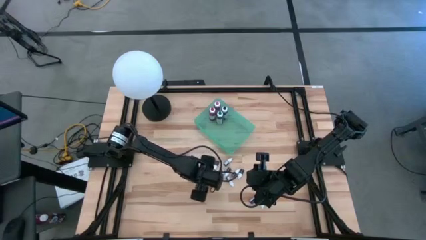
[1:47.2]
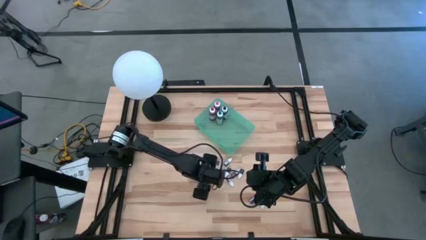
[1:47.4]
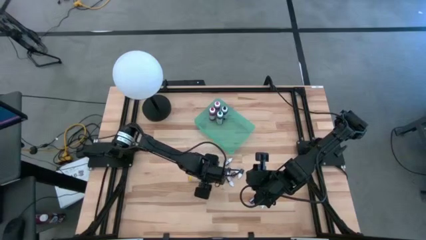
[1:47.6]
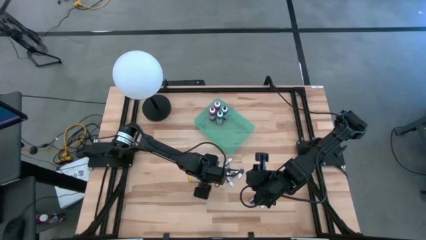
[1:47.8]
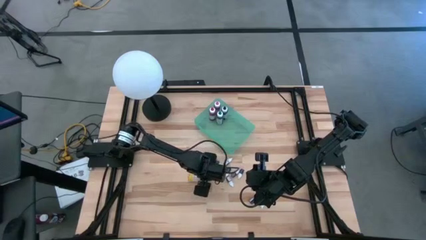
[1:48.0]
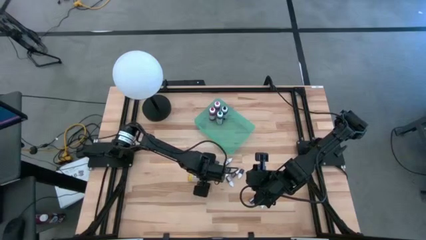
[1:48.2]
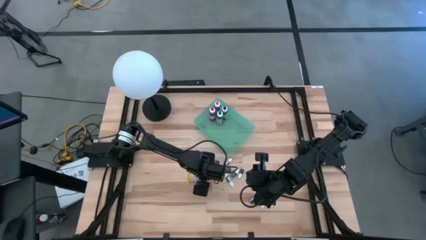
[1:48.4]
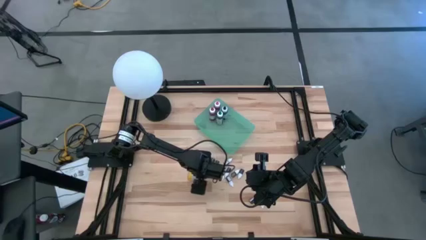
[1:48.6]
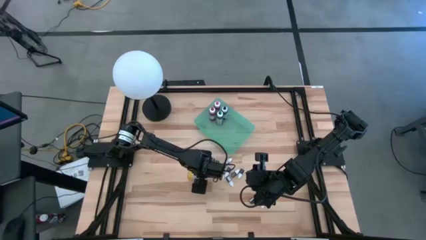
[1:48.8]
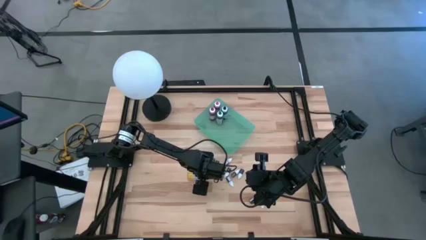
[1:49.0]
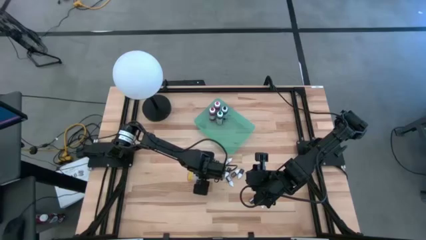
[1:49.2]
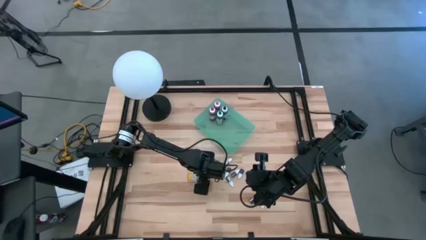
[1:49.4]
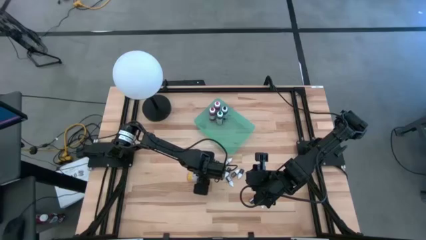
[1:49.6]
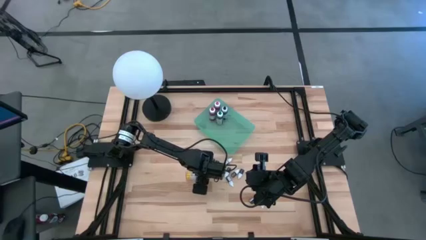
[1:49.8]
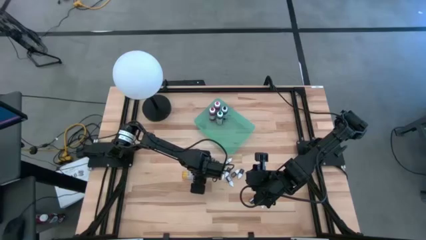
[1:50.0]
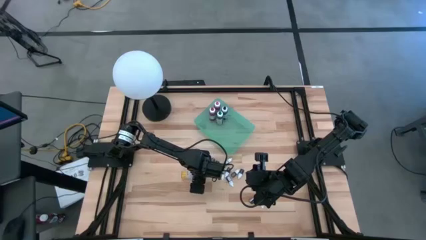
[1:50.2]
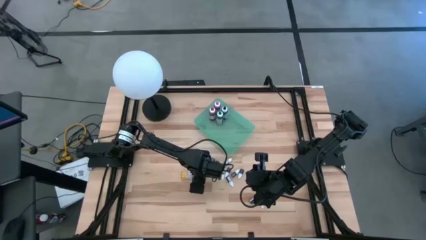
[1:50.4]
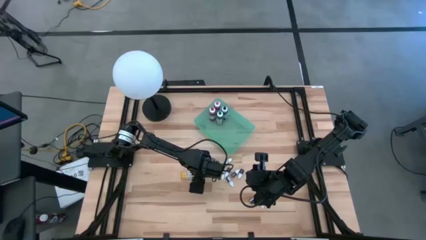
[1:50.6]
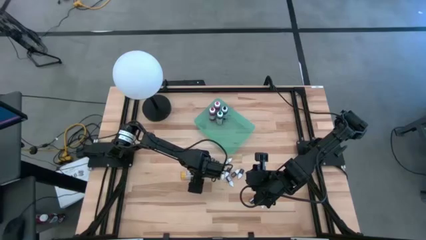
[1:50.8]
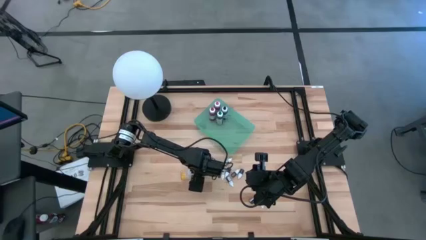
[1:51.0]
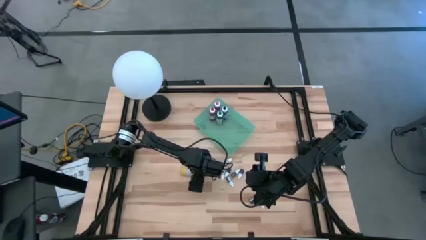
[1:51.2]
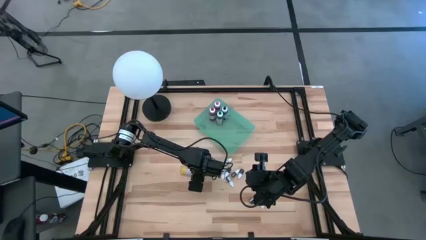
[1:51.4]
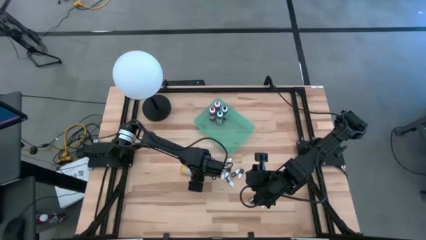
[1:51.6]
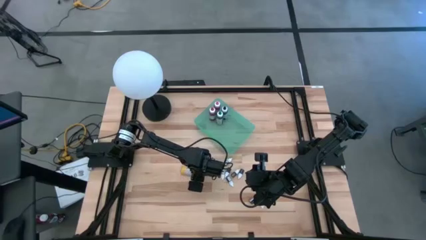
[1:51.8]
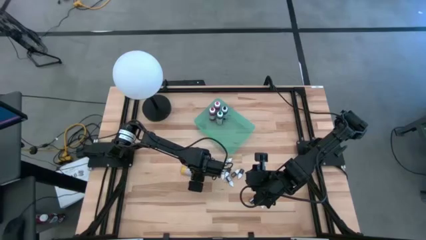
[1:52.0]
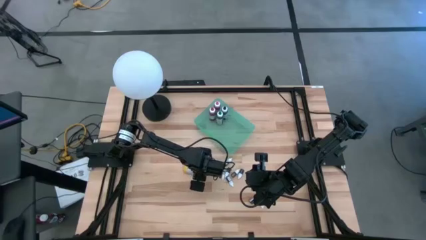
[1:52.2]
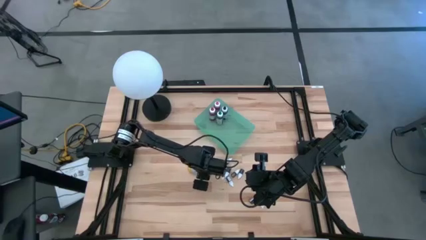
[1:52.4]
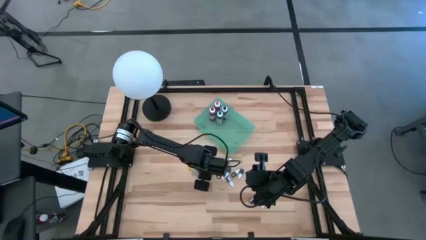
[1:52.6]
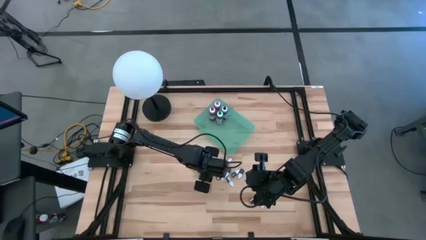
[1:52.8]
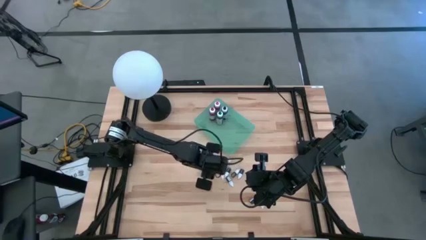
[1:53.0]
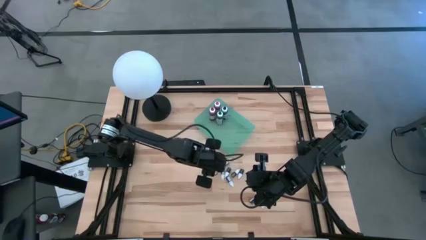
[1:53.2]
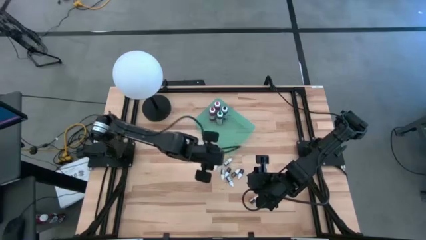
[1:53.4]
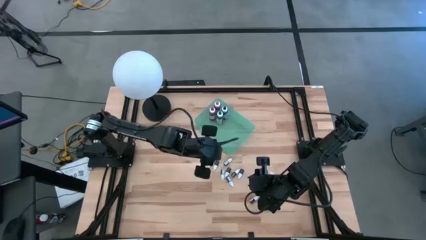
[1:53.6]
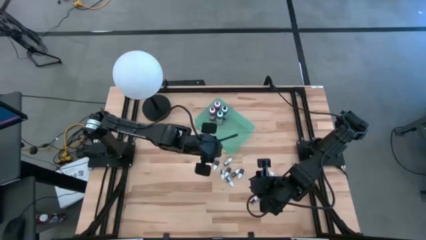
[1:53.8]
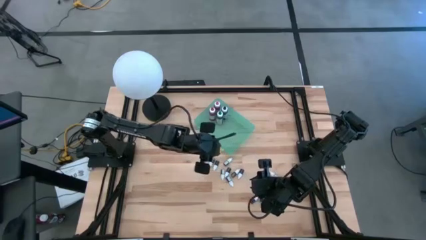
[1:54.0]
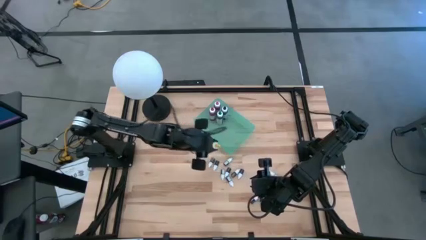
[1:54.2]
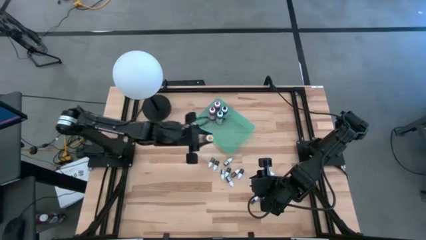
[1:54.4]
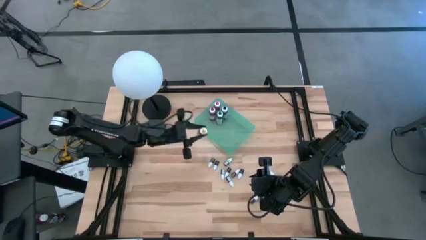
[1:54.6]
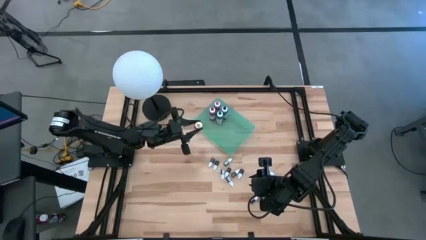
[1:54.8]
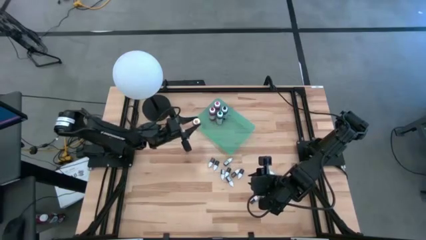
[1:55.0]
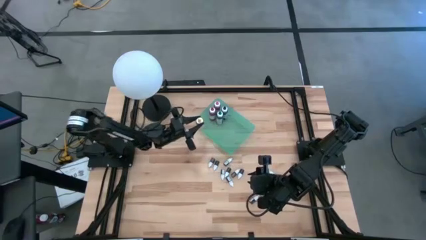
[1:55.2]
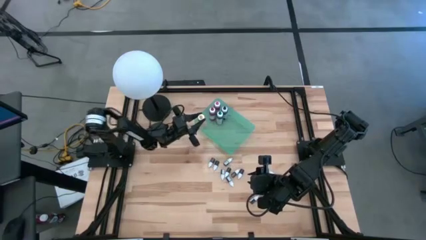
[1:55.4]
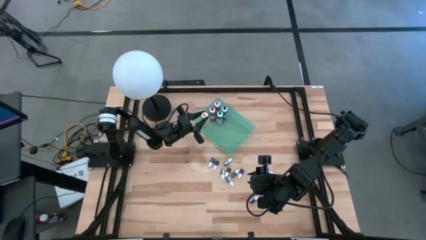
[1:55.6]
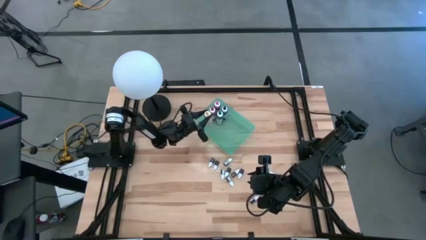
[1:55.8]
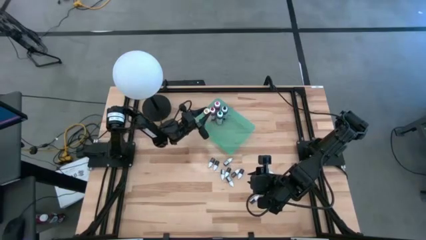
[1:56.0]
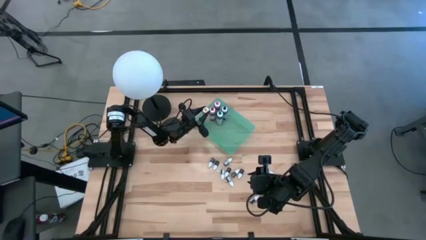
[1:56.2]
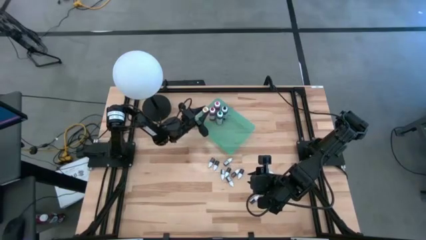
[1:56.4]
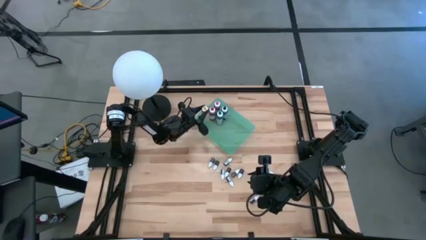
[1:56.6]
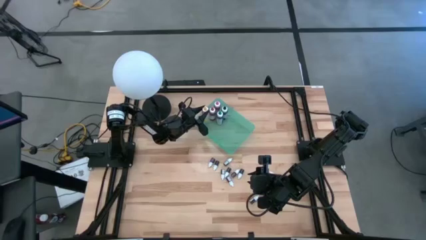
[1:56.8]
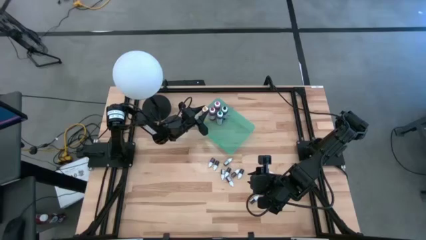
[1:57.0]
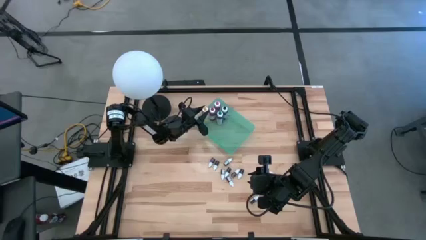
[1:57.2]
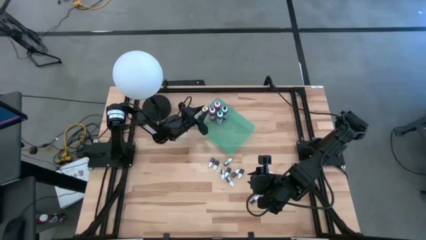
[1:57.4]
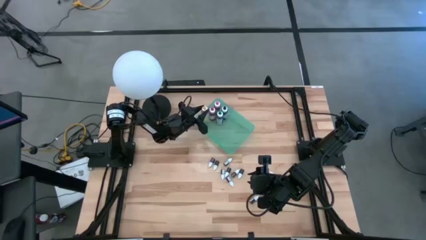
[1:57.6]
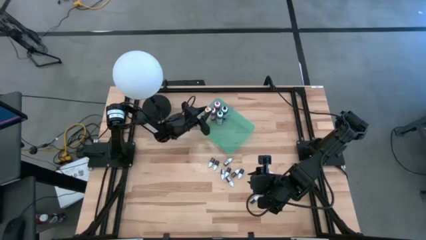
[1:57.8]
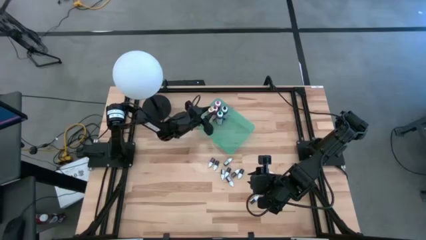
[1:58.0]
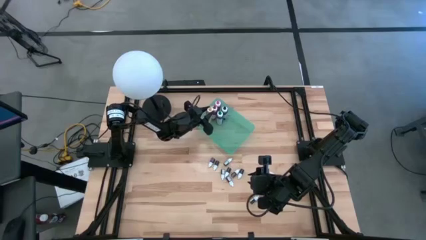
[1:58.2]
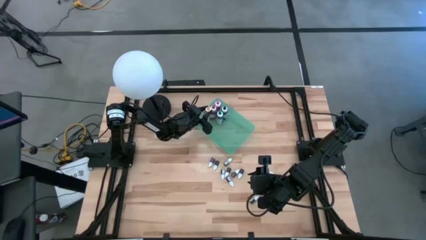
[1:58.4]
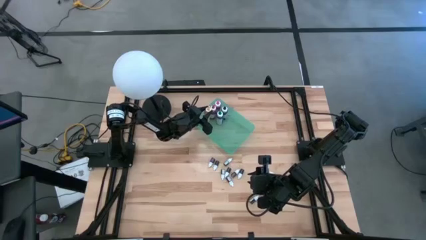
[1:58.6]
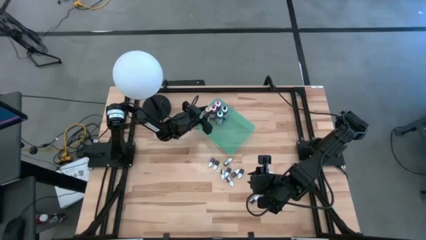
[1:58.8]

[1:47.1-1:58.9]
Task: Pick & Place food coloring
Put the large yellow food coloring bottle into the green bin
